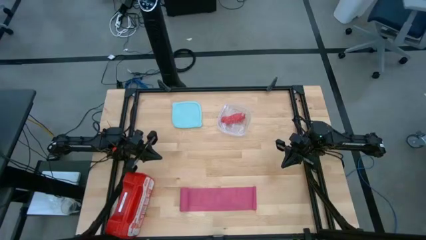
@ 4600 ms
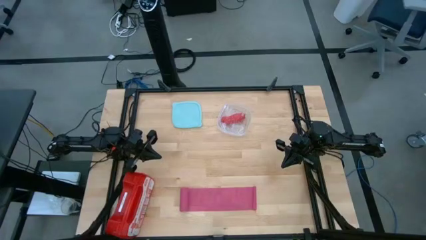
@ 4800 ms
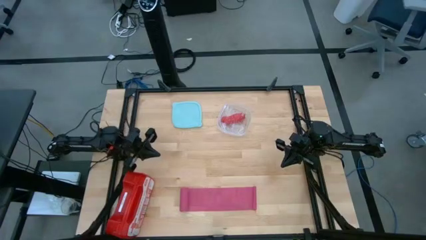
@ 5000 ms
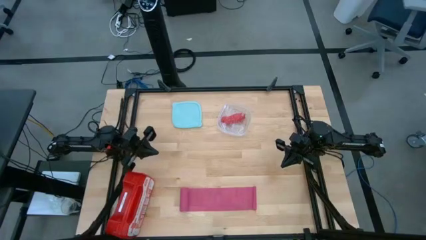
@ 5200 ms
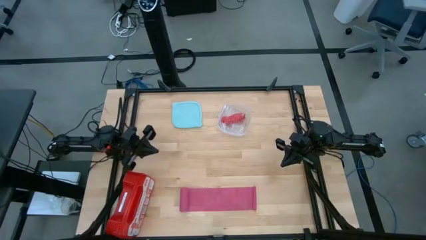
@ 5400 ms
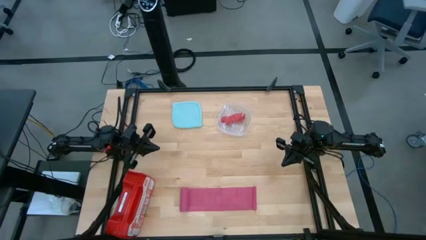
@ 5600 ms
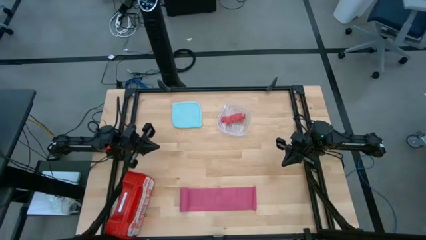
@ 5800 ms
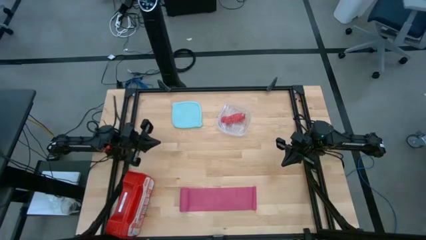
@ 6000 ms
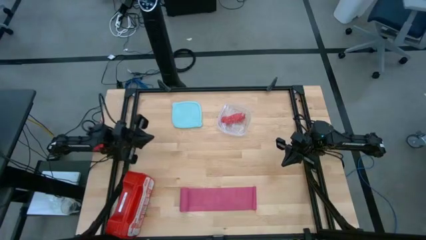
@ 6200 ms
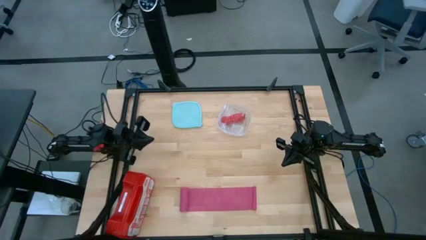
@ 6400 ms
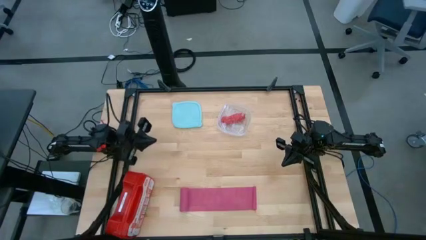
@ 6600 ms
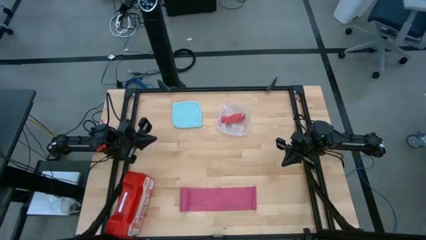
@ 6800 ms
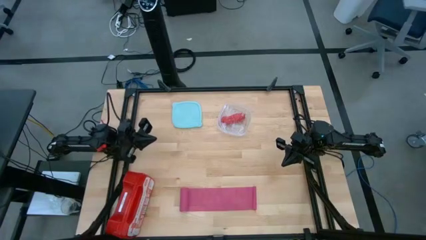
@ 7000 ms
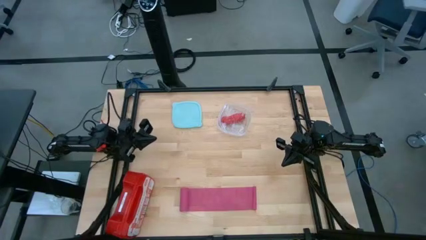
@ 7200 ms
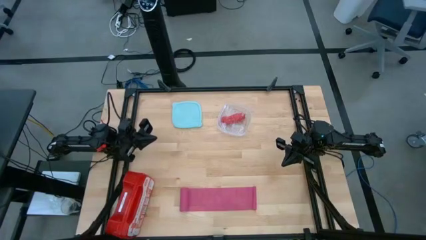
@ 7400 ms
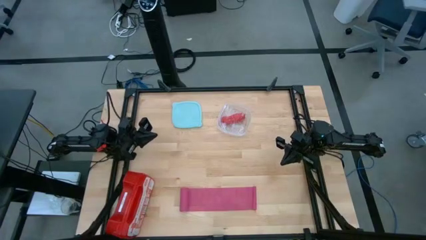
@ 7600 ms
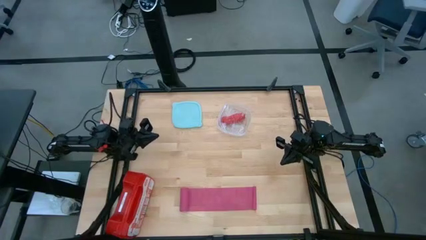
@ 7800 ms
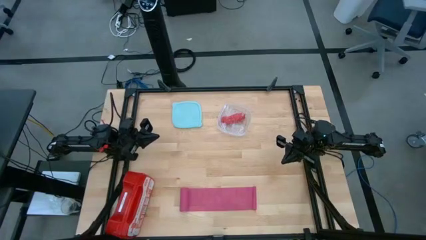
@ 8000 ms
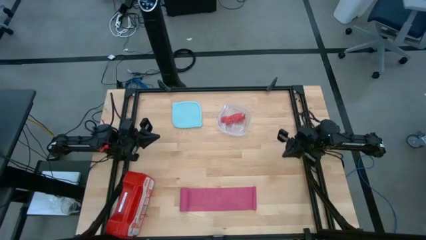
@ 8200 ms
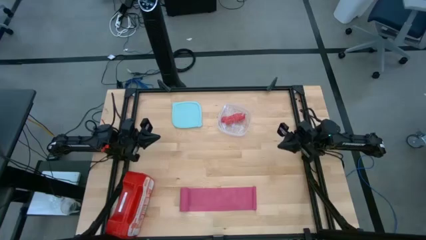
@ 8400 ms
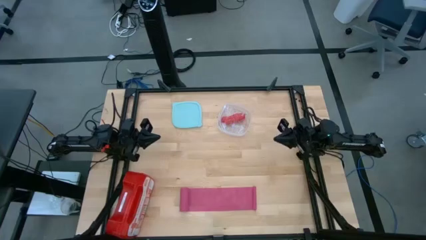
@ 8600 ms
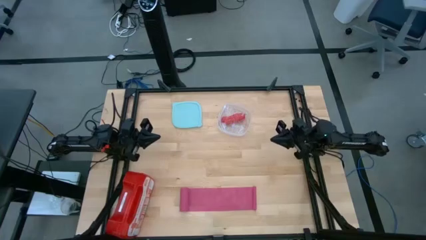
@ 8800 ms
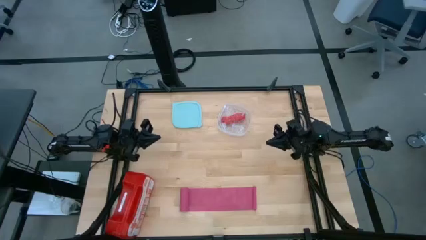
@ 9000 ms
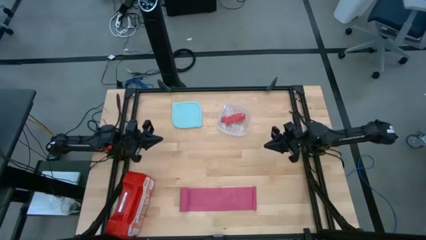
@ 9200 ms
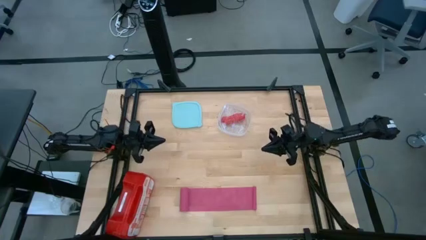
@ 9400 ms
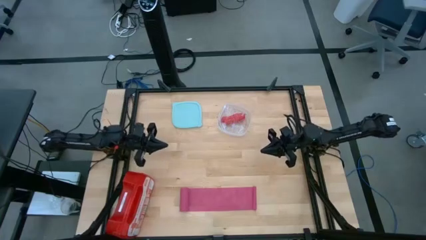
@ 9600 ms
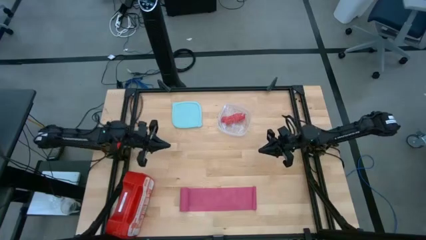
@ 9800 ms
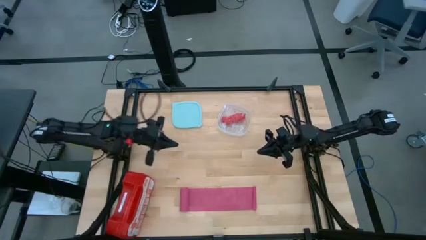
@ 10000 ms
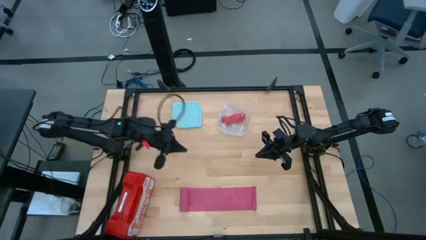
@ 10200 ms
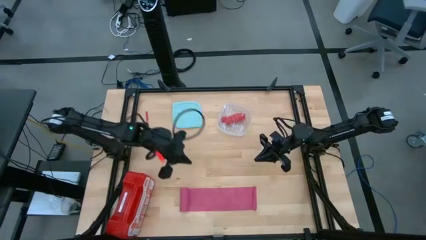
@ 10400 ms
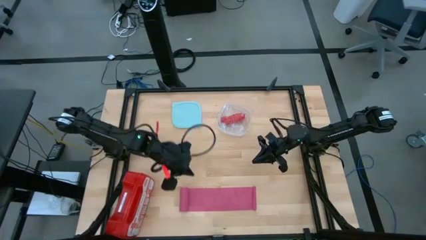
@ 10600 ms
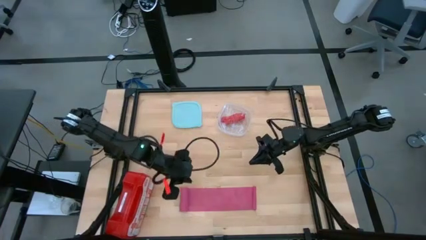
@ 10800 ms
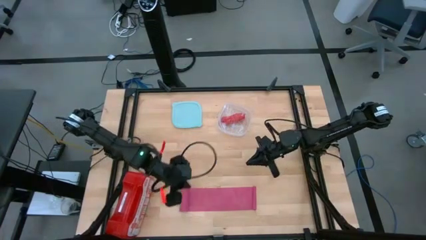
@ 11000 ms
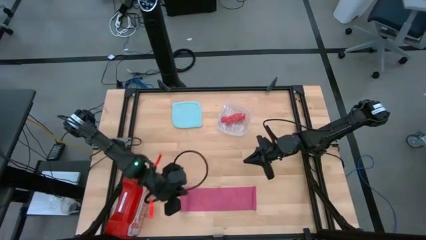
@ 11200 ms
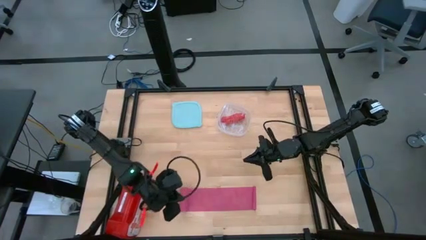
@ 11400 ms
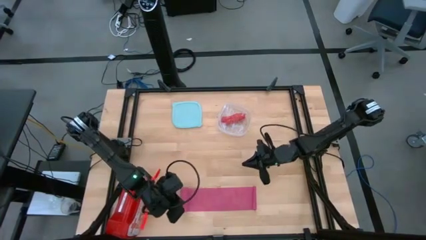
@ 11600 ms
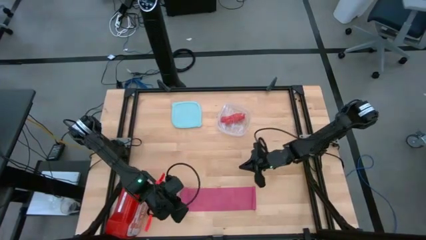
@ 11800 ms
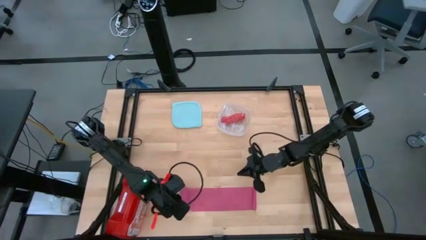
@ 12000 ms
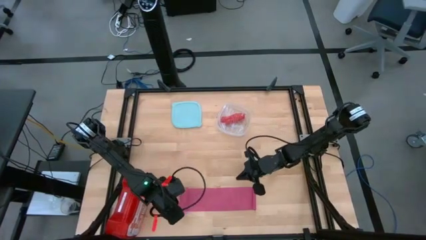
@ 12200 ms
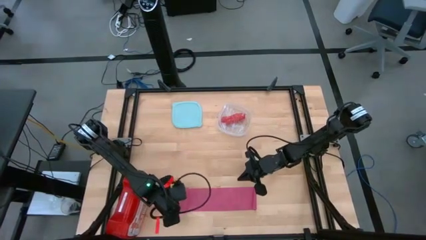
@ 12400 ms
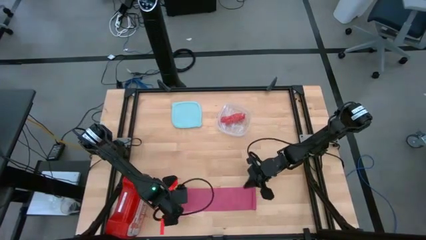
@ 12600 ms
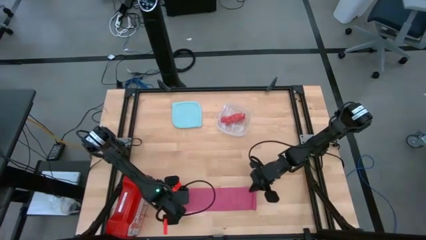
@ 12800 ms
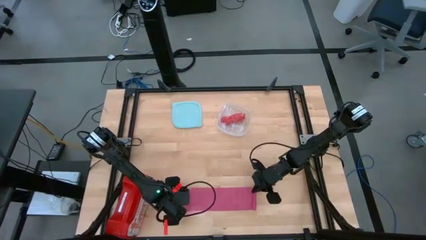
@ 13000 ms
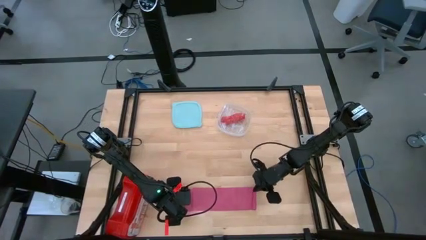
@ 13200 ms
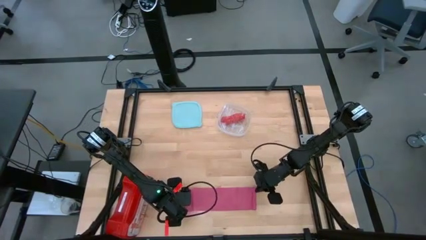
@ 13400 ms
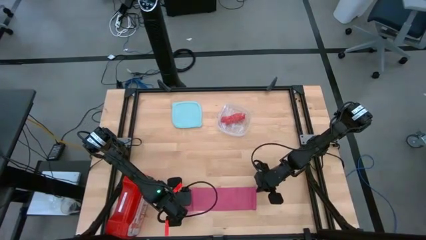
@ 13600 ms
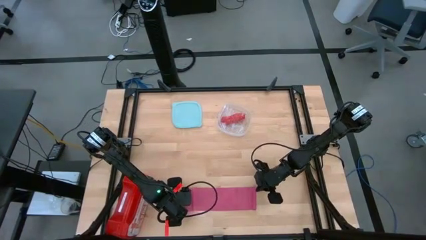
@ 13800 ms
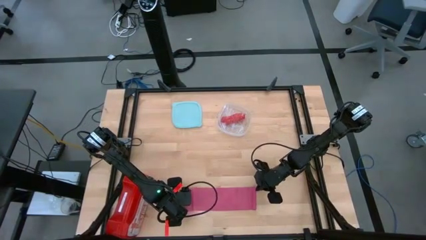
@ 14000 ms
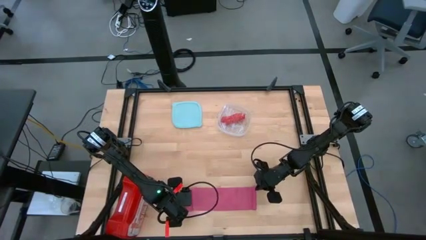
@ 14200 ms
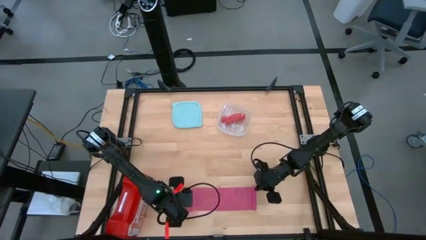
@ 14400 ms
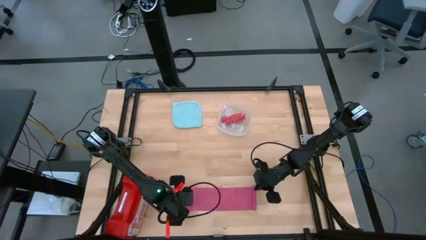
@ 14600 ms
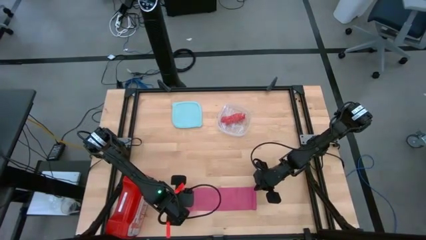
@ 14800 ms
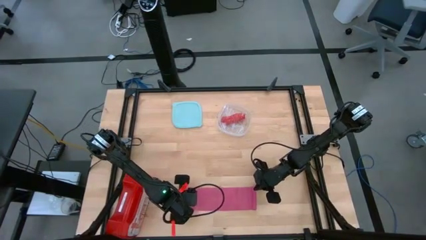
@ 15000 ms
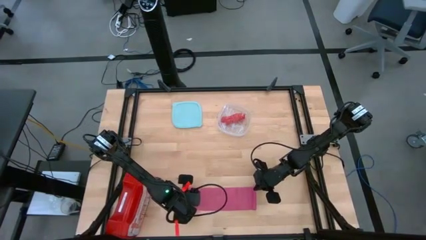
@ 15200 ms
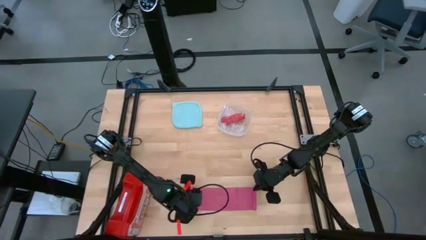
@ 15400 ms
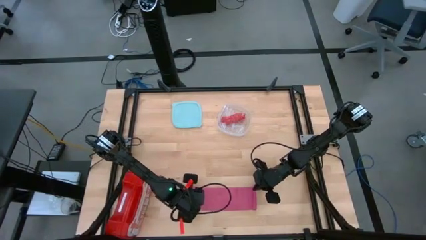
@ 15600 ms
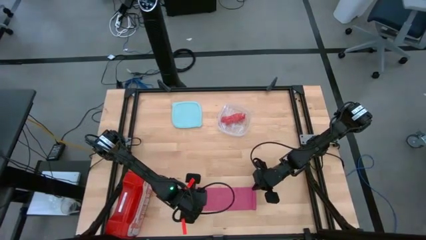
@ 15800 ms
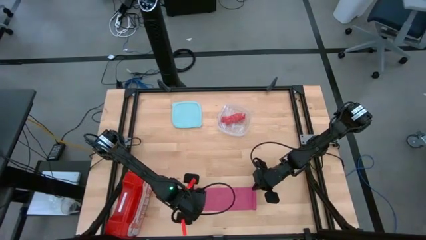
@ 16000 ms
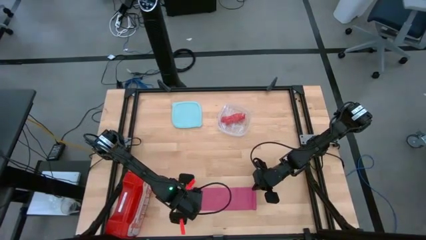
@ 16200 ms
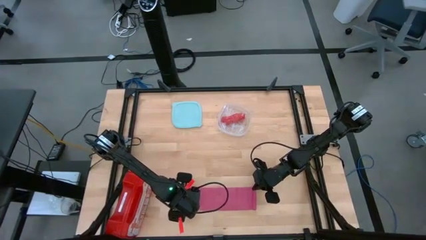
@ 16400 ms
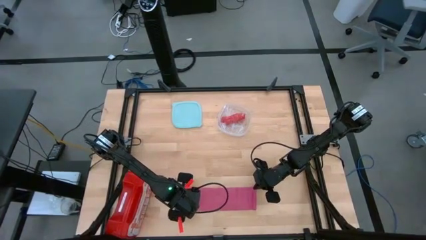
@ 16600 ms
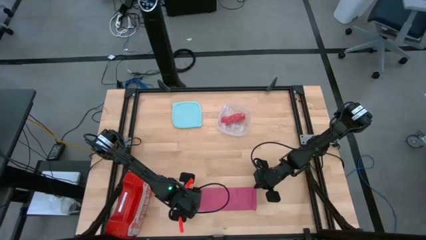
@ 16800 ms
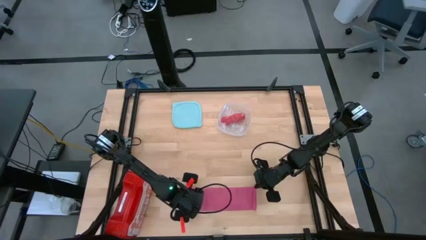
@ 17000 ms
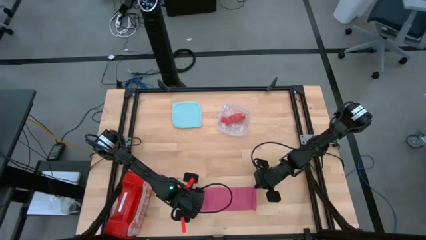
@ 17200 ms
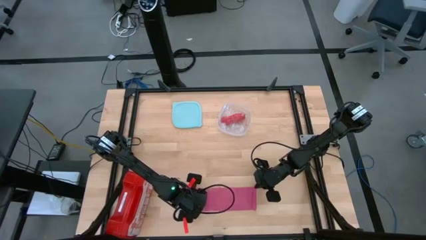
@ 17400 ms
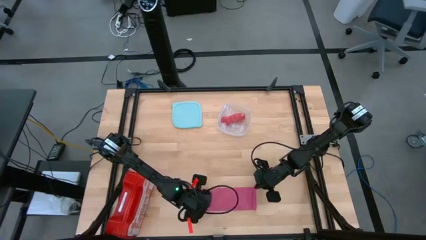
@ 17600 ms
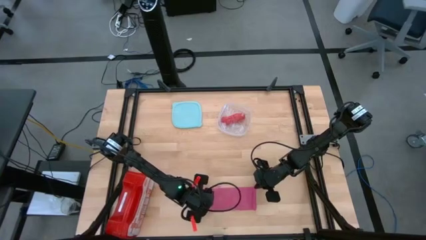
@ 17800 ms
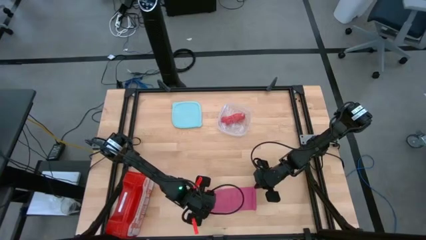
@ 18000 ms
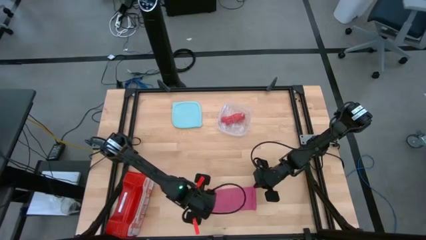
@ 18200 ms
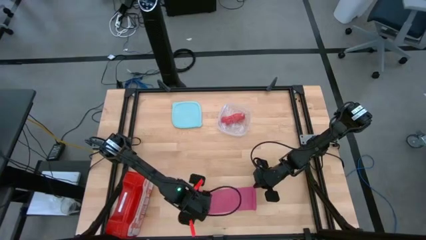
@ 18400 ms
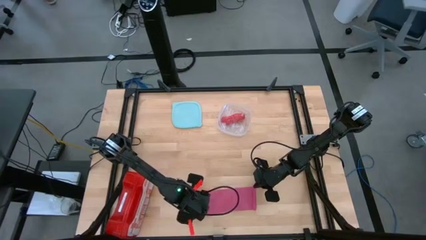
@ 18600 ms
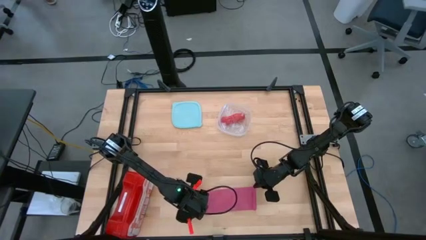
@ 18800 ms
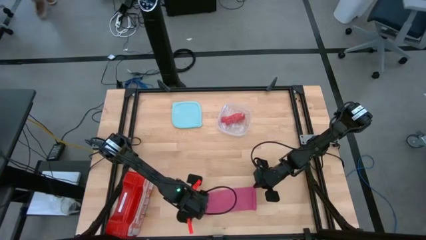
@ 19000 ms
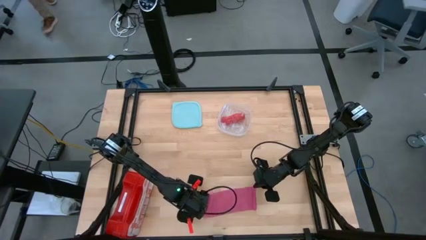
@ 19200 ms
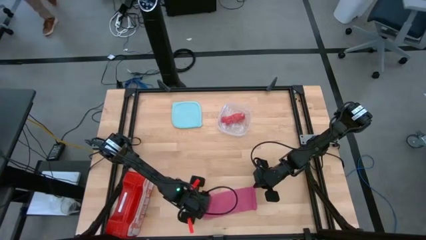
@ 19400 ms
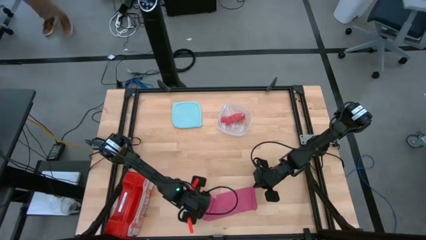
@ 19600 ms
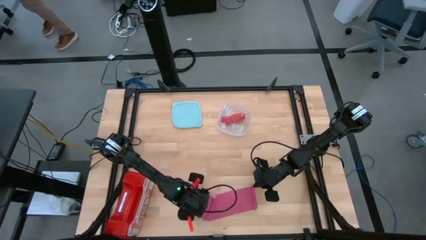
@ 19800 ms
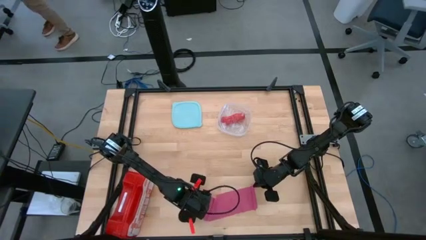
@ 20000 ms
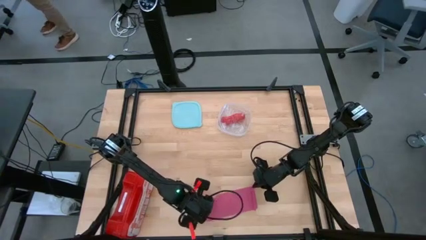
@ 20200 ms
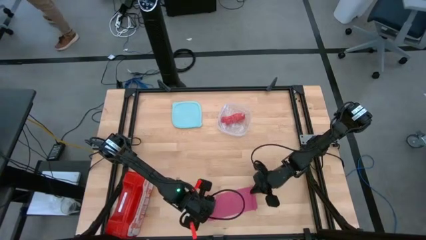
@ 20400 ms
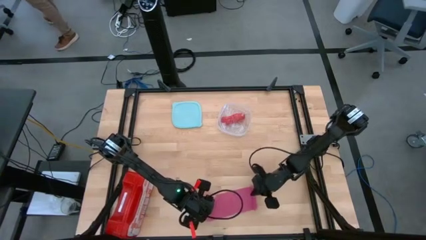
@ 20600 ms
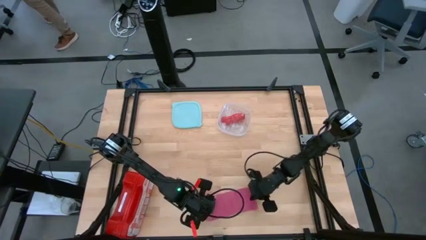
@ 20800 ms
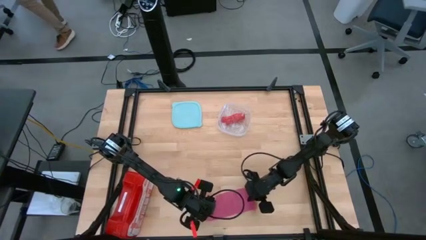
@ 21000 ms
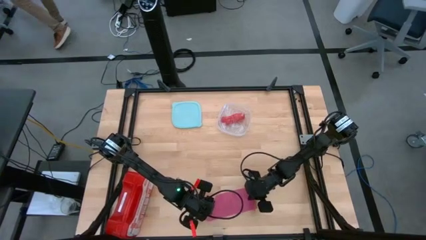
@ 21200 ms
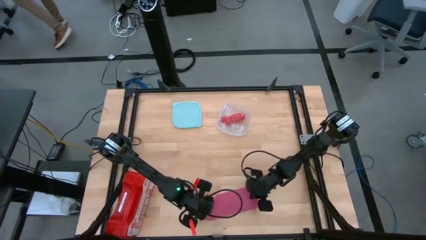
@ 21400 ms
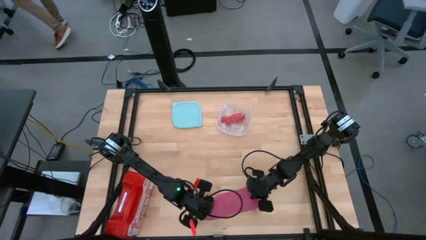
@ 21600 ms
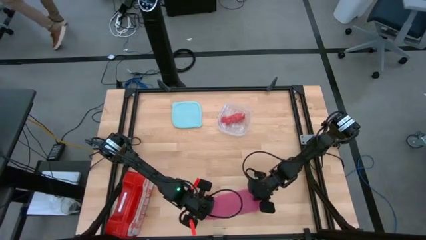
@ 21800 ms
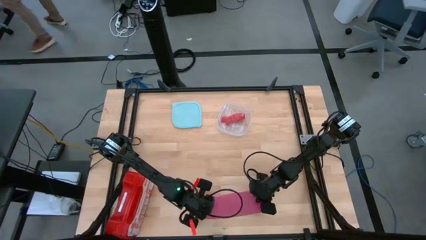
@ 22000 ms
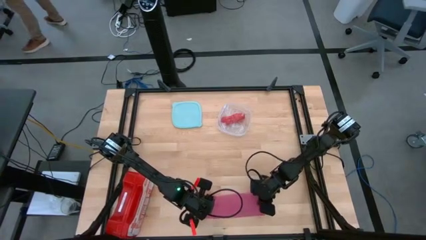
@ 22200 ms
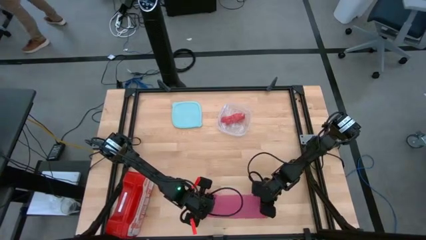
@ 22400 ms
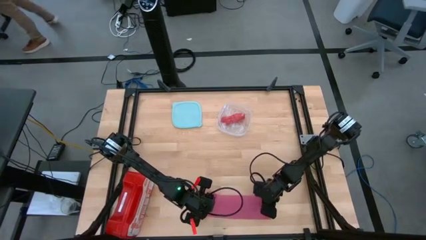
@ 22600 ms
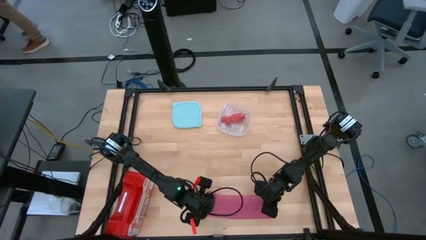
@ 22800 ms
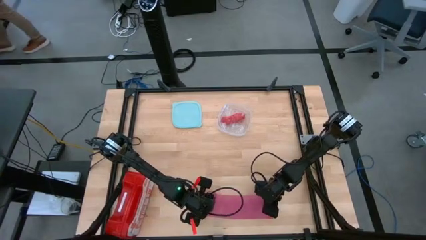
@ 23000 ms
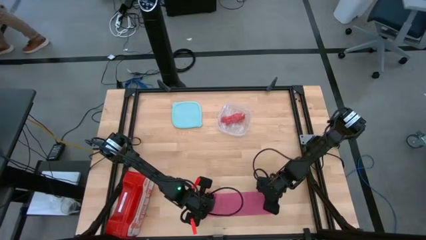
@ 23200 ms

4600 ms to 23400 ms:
Task: Roll bandage
Roll the pink bandage
